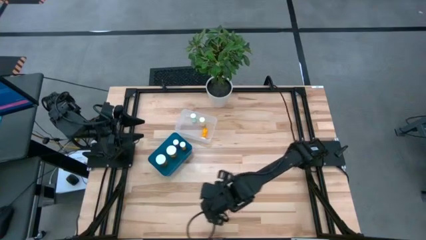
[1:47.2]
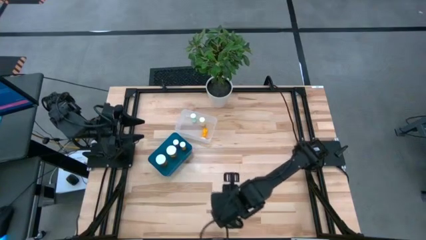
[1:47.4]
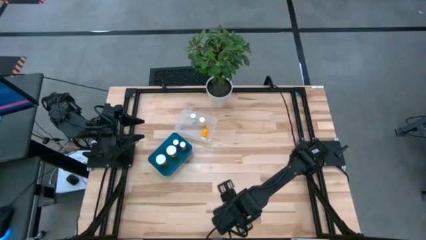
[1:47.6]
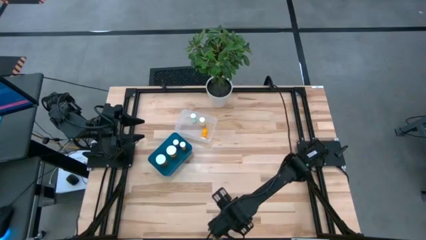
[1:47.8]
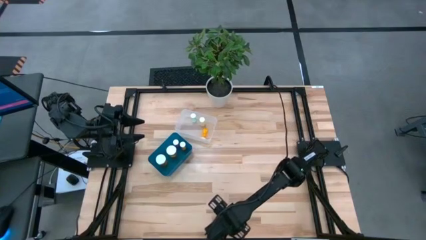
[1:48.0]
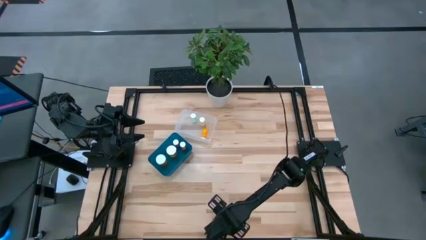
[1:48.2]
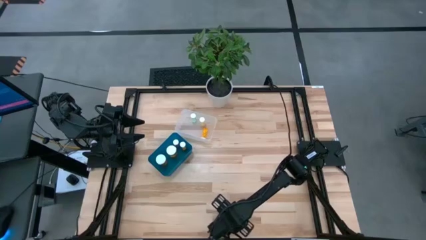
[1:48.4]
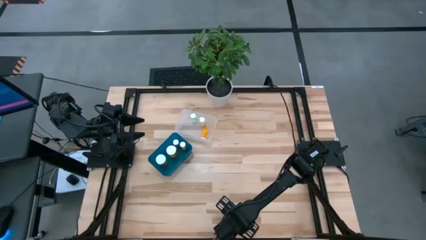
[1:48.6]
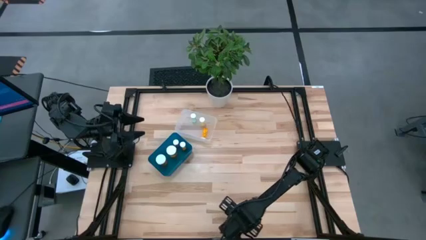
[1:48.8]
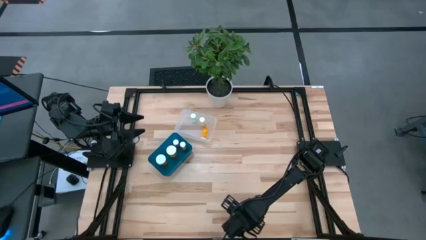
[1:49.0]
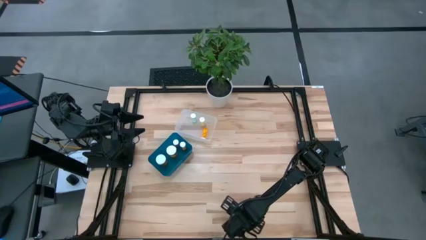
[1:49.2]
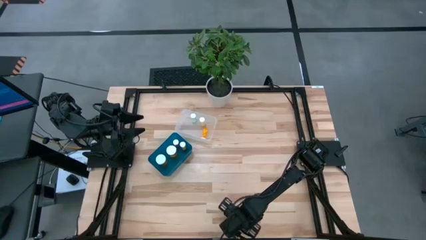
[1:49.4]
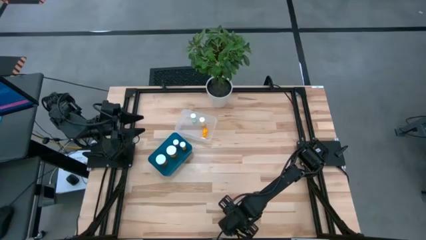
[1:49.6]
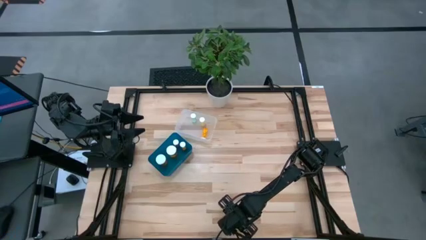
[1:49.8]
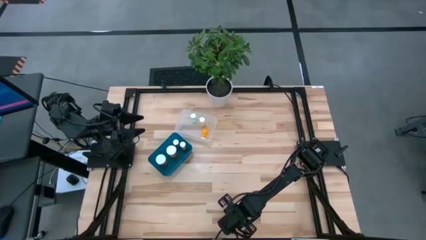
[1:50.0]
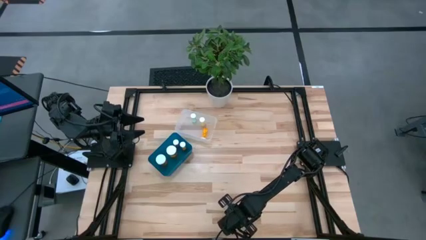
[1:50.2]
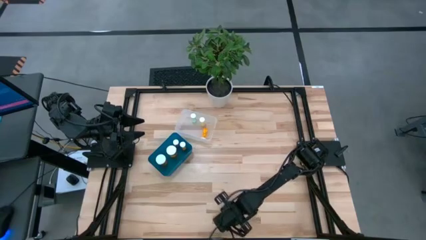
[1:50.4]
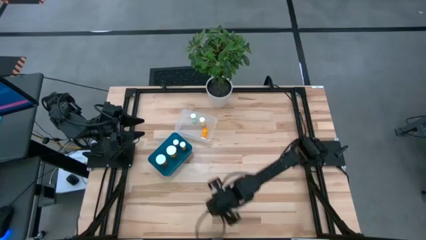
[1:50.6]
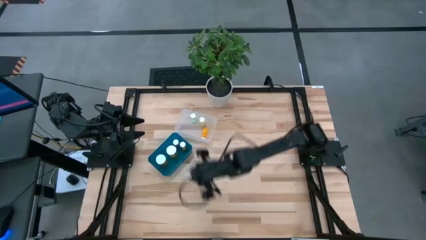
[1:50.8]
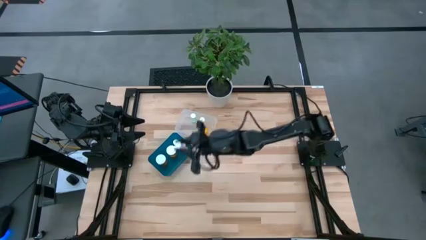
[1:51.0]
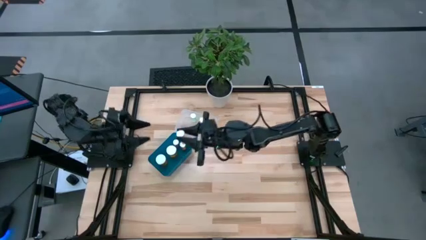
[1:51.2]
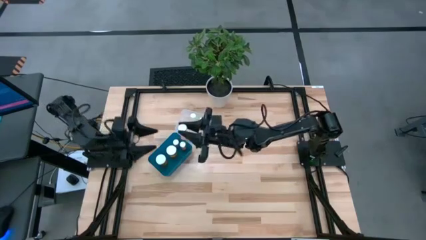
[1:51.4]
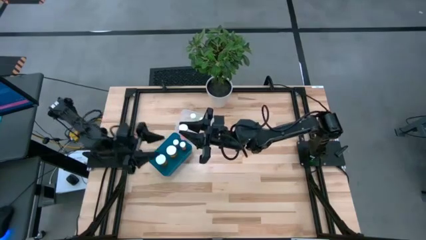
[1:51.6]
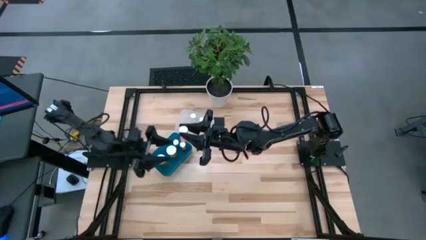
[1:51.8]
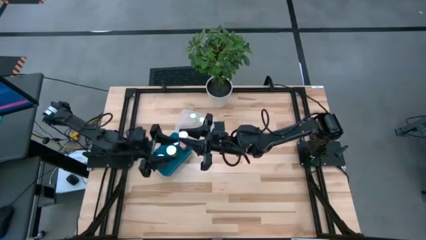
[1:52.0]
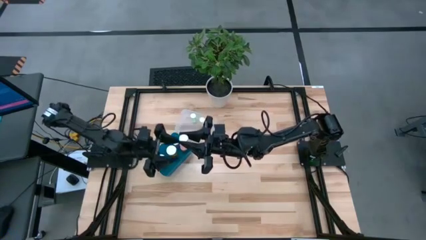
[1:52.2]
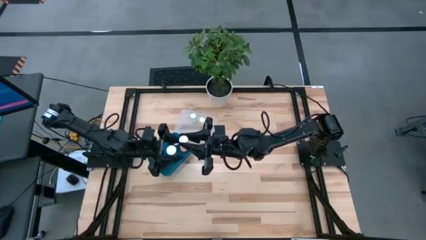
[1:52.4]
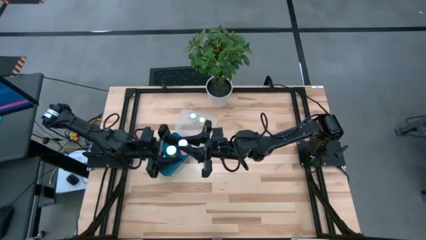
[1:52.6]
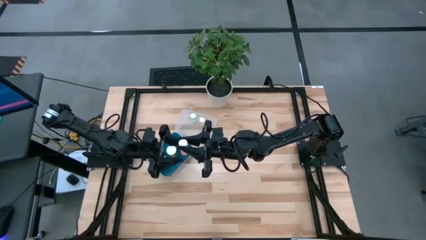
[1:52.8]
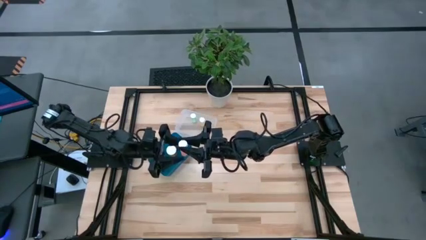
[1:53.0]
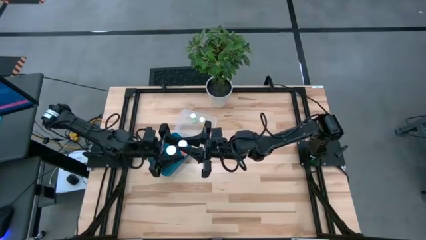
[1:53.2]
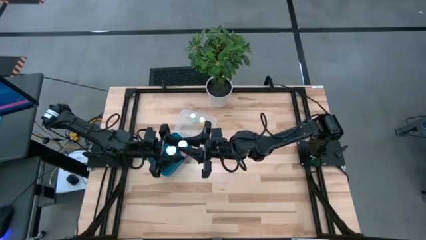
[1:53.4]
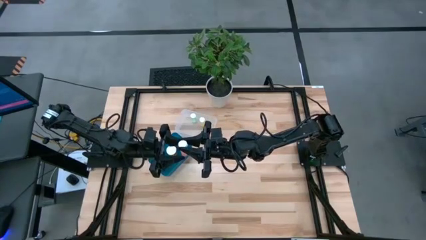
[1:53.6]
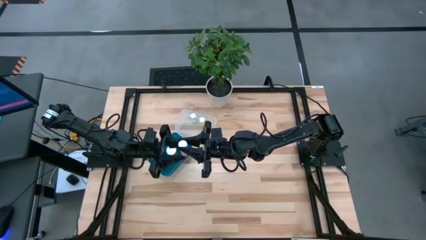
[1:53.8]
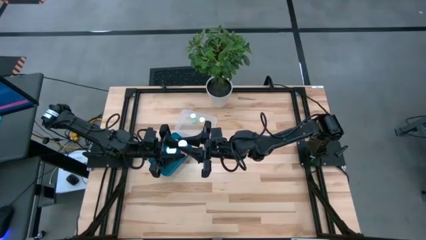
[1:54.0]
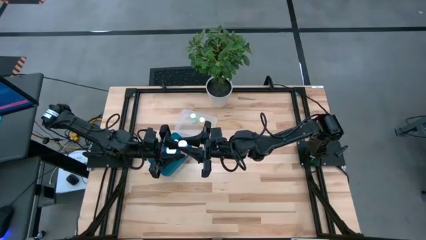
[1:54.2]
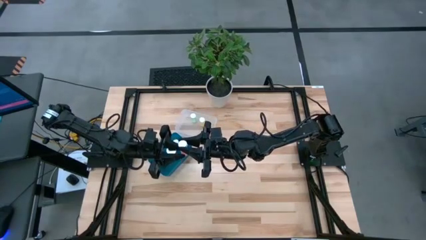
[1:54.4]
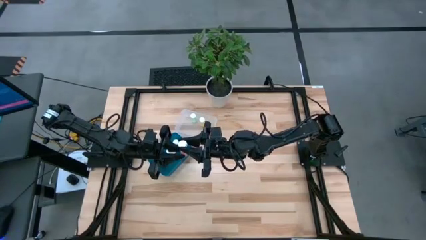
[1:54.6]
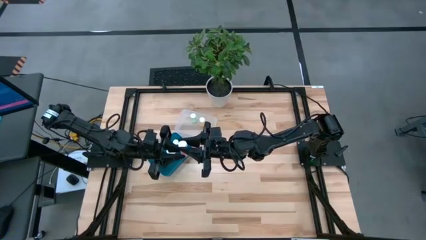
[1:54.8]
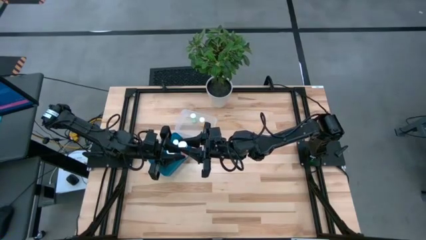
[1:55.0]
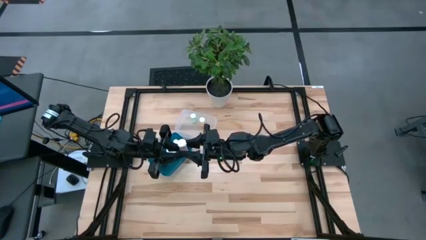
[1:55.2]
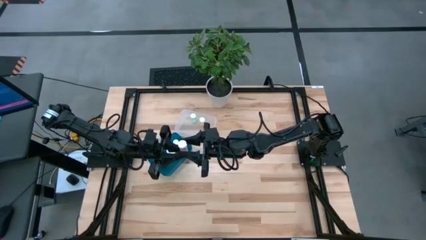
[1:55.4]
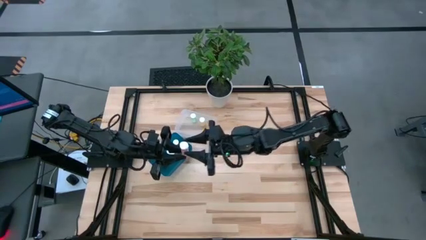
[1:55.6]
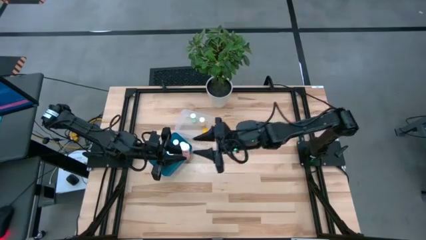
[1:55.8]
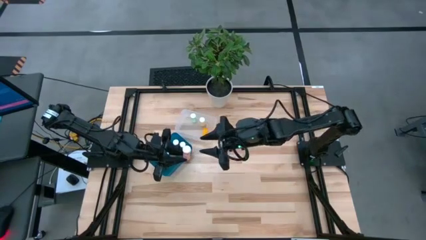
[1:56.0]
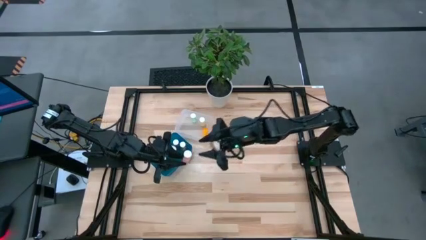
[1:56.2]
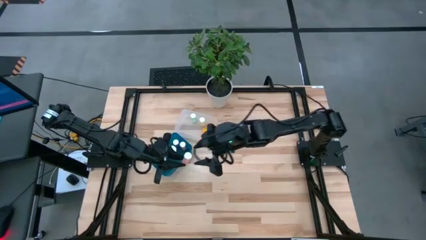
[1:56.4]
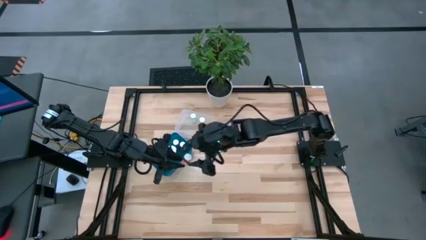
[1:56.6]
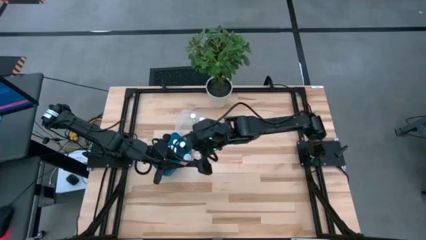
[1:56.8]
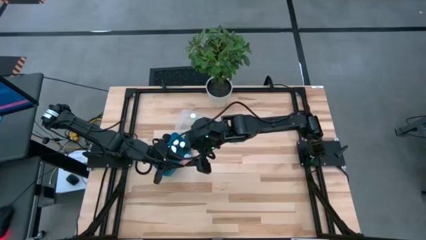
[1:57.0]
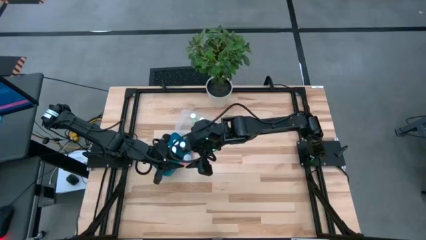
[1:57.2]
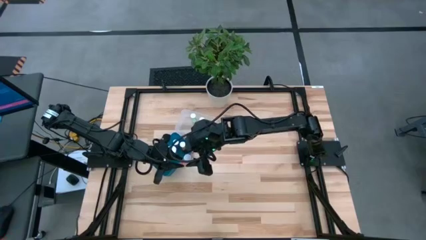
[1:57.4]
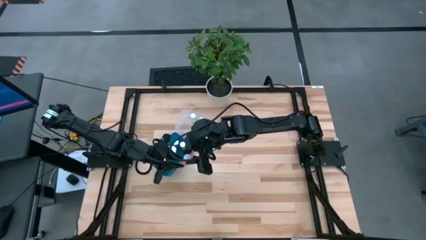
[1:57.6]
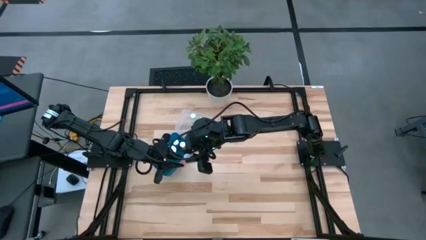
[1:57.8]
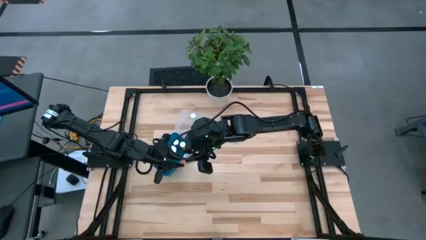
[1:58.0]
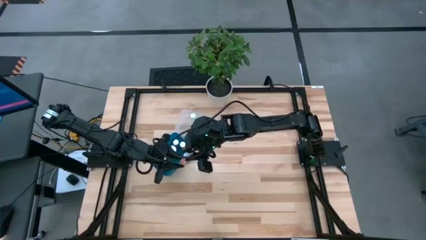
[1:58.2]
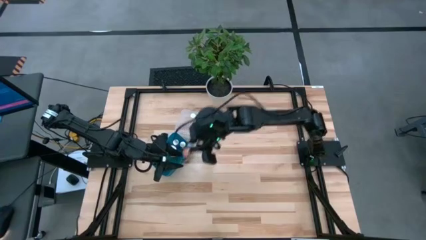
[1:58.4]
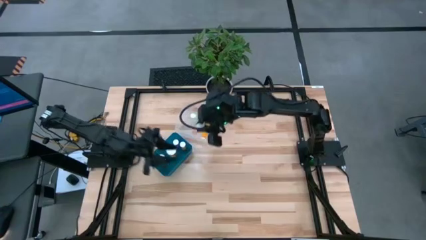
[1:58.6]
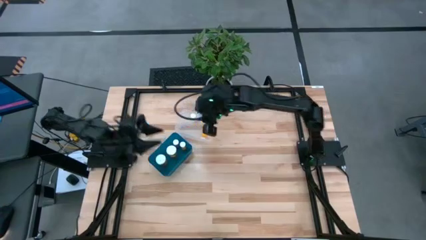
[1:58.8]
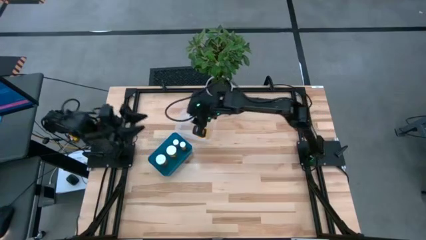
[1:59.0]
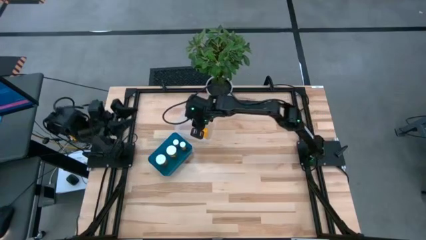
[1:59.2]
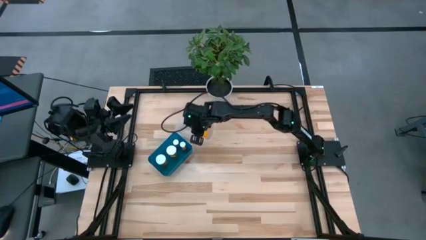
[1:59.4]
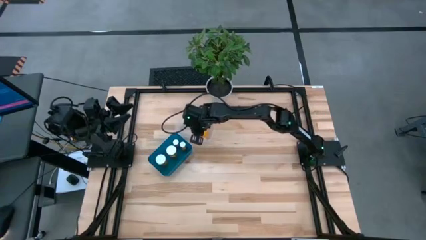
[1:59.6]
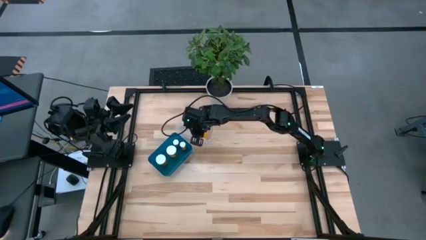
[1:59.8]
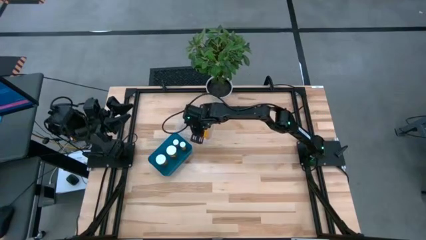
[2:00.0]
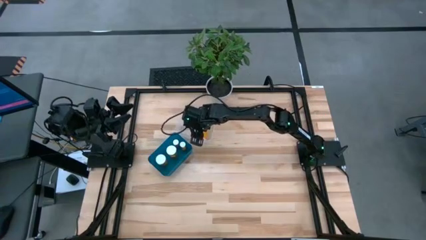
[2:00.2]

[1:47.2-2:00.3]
Task: Pick and place medicine bottles into bin by pill shape (circle, oval)
Put the pink pill bottle into the transparent bin

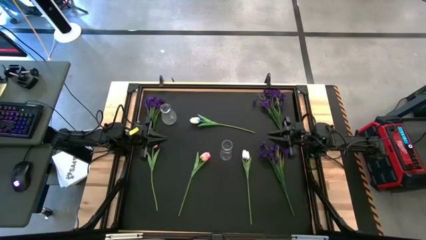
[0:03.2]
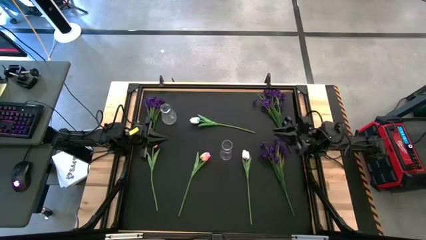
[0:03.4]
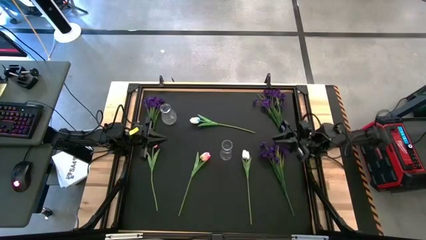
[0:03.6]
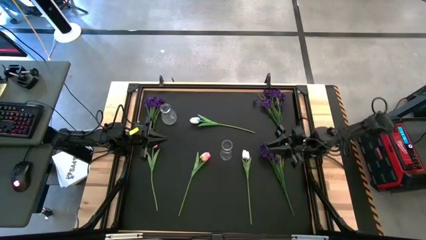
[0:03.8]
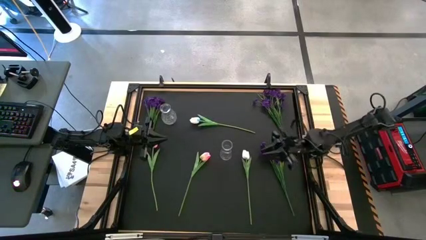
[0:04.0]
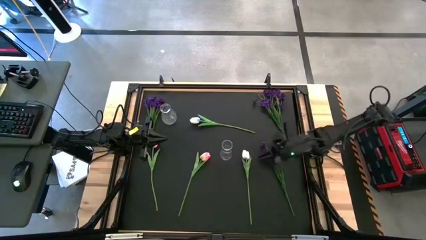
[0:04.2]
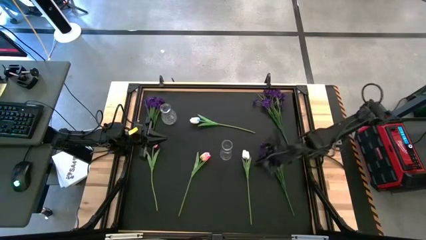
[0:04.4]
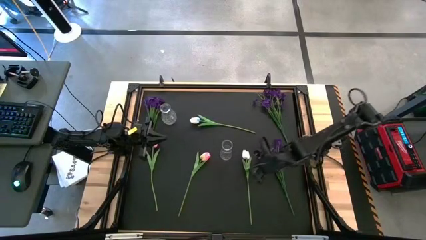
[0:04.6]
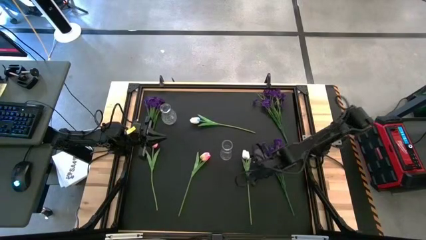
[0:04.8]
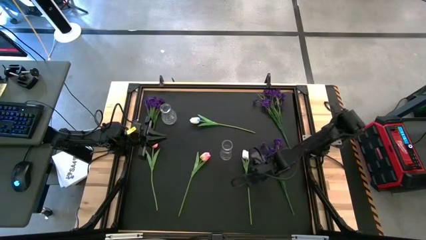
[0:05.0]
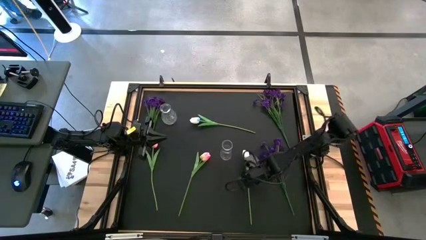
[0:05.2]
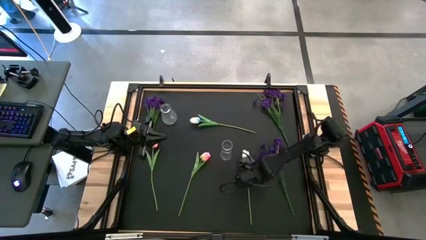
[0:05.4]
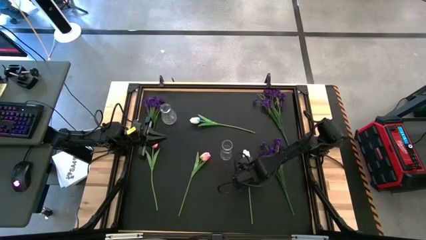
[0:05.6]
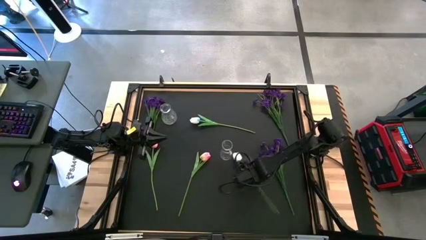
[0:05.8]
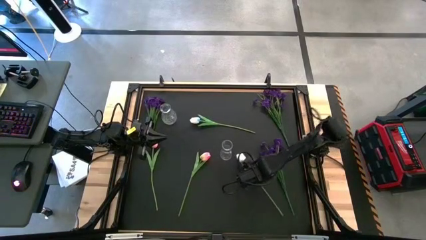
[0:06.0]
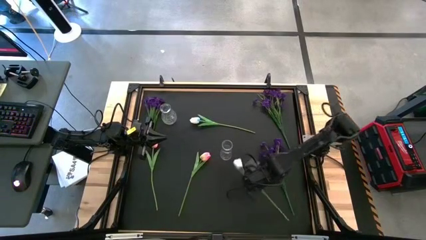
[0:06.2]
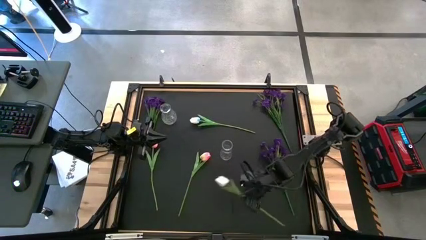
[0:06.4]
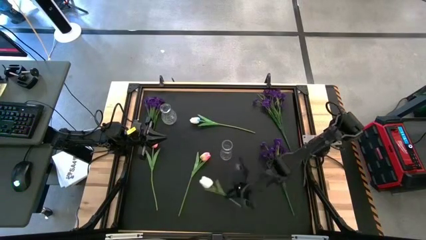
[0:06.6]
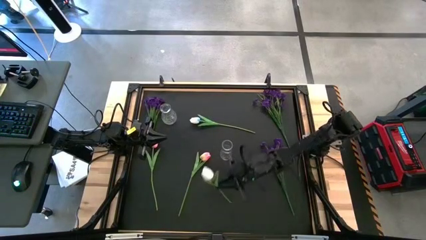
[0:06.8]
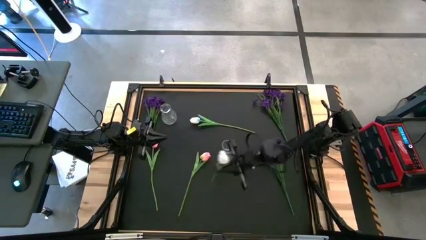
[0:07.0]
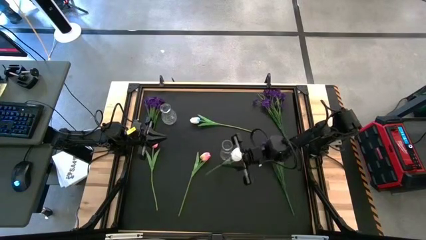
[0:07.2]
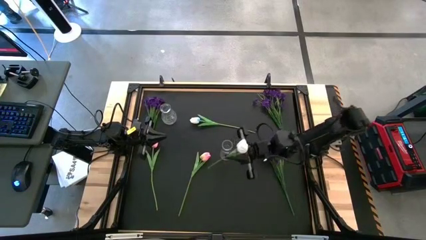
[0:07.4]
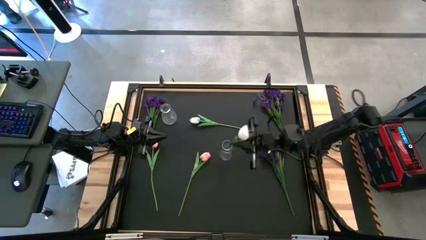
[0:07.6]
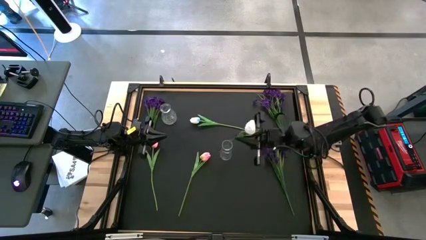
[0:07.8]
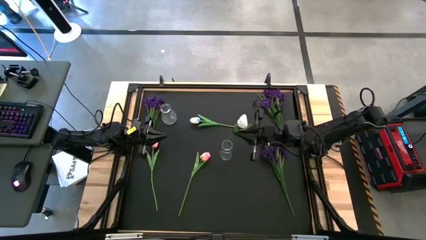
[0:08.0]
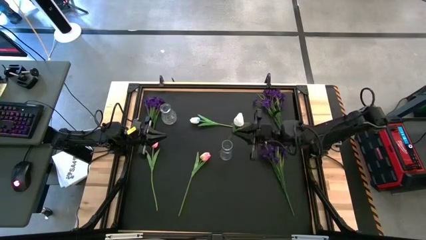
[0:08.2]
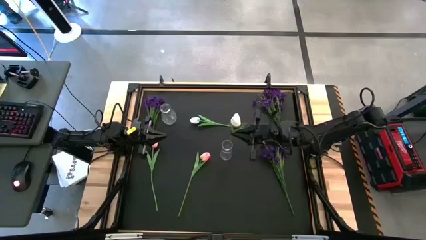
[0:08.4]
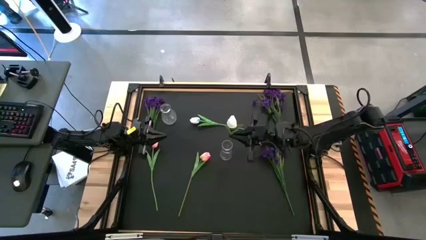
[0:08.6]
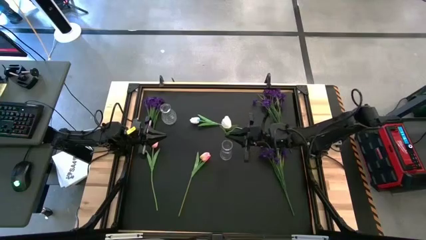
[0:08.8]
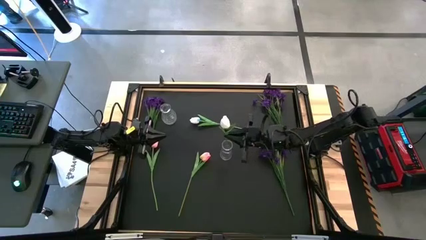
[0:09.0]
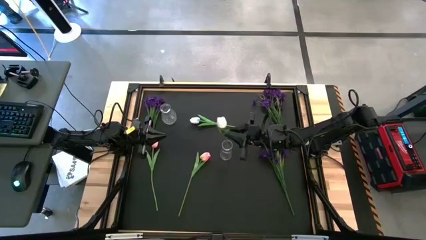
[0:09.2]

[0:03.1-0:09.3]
Task: Sort flowers into vase by color
Put the bottom white tulip into the right transparent flower vase
